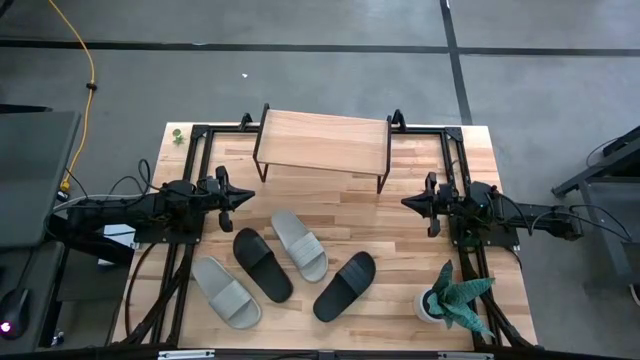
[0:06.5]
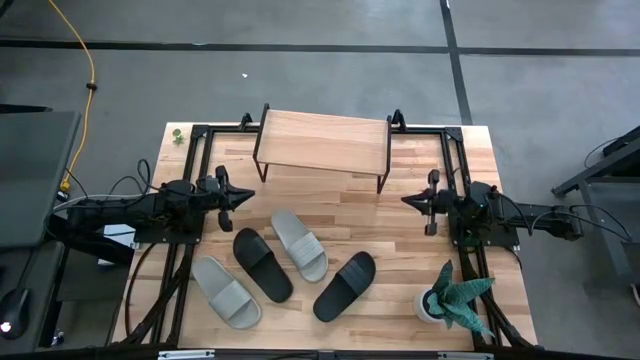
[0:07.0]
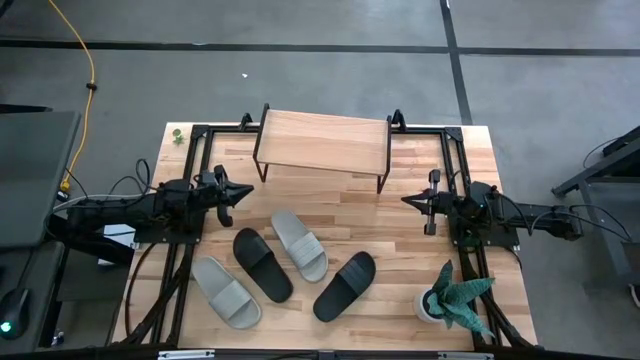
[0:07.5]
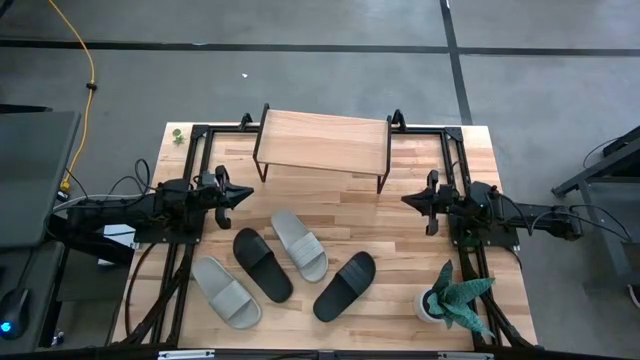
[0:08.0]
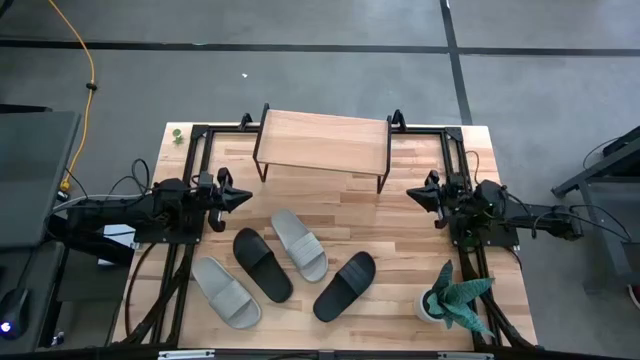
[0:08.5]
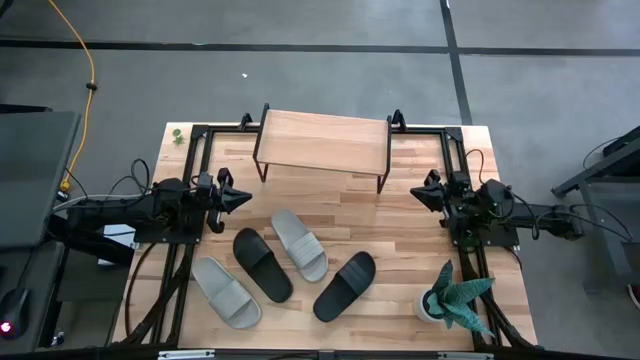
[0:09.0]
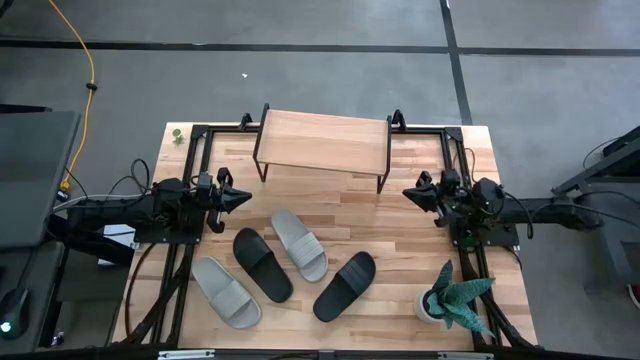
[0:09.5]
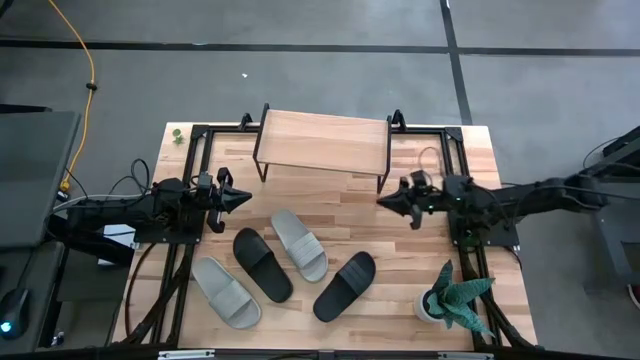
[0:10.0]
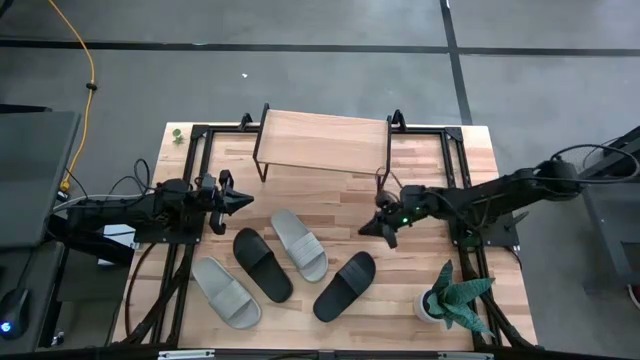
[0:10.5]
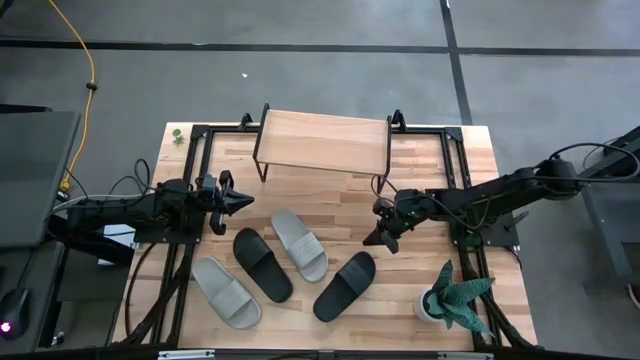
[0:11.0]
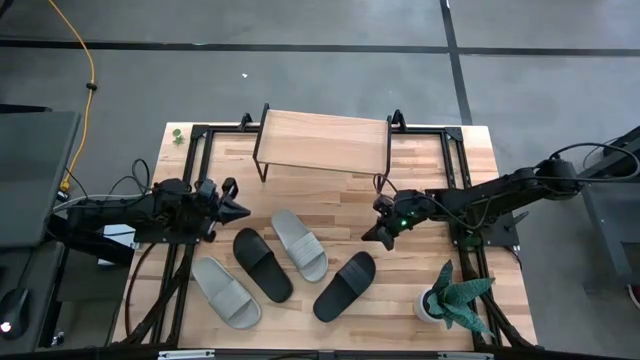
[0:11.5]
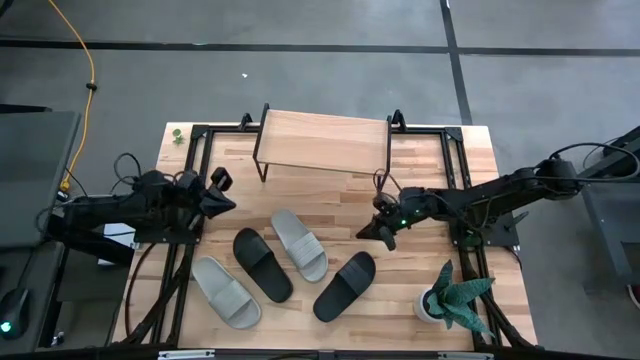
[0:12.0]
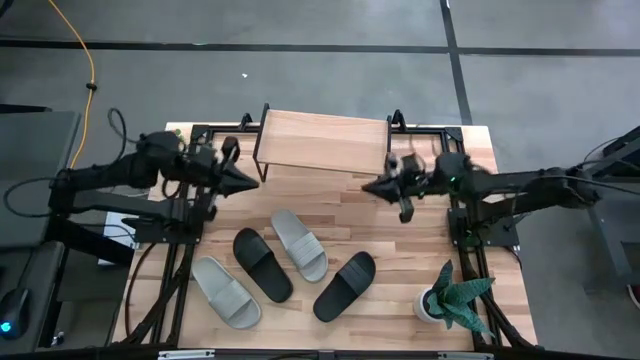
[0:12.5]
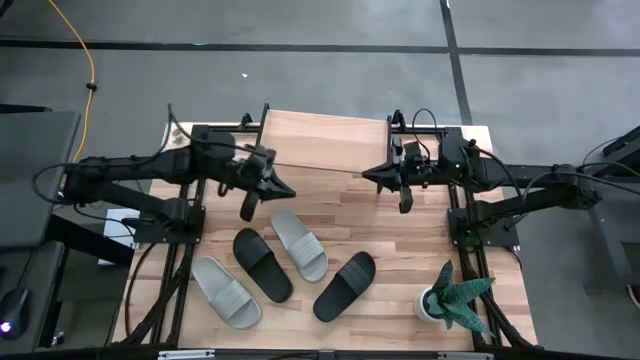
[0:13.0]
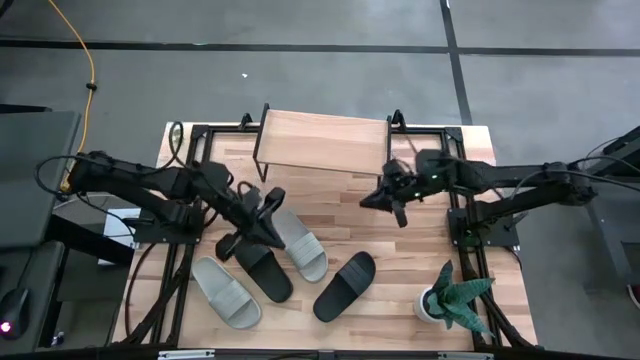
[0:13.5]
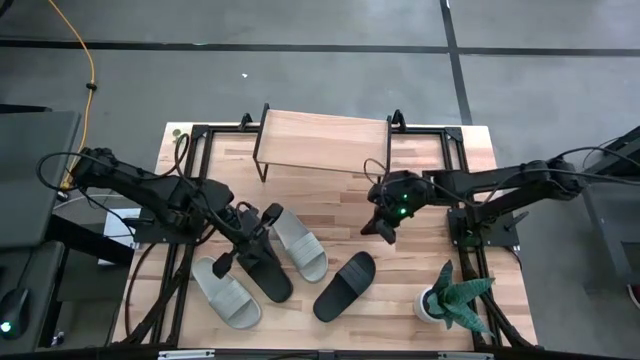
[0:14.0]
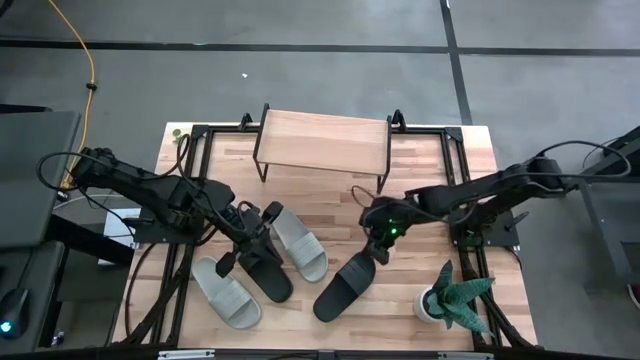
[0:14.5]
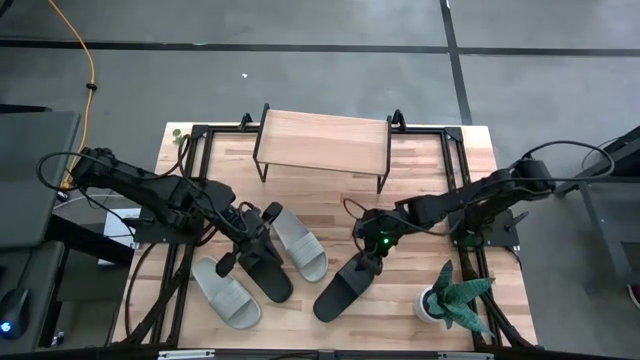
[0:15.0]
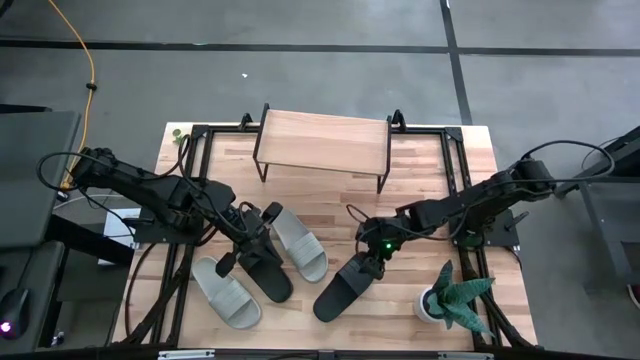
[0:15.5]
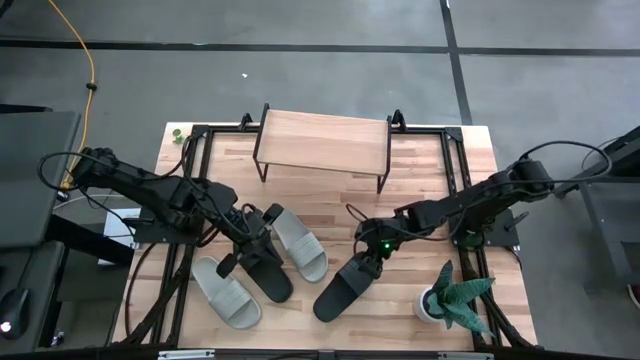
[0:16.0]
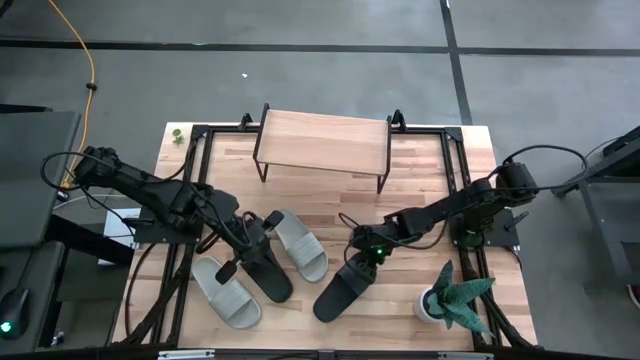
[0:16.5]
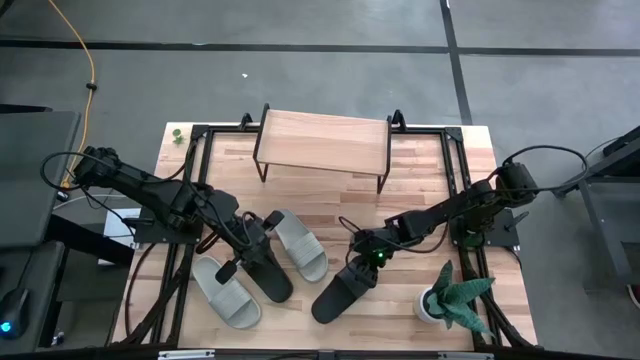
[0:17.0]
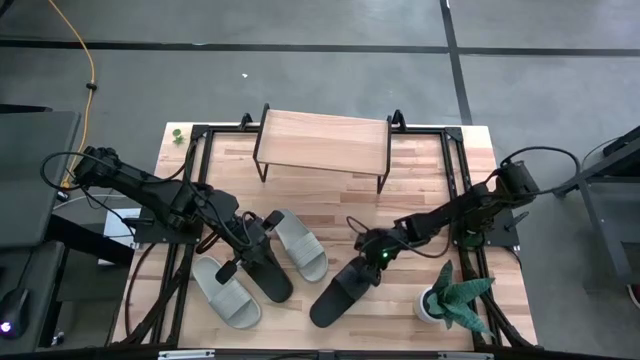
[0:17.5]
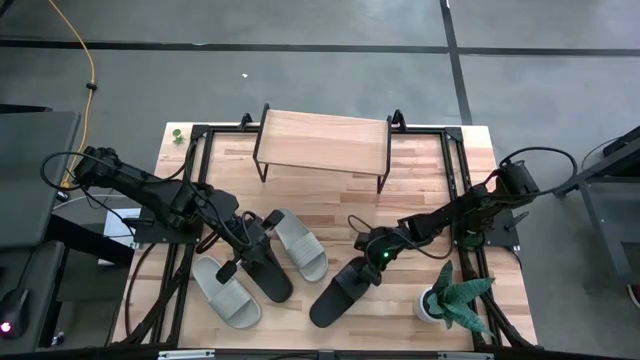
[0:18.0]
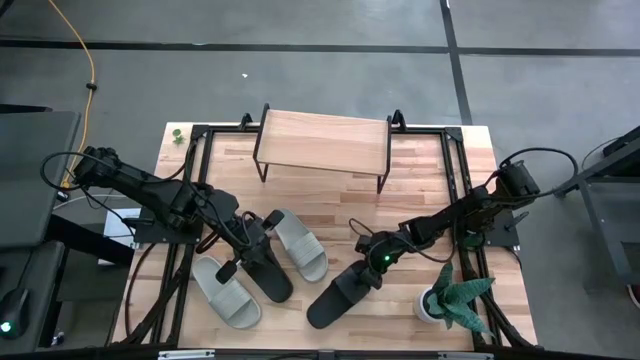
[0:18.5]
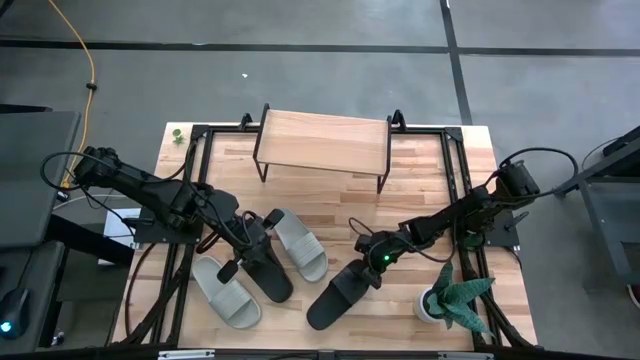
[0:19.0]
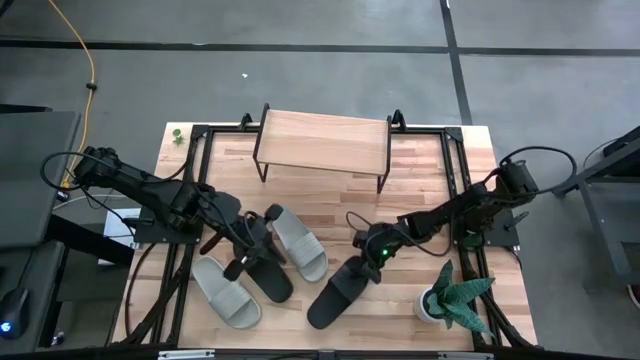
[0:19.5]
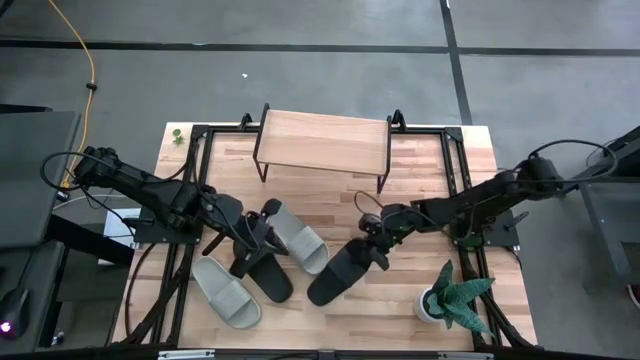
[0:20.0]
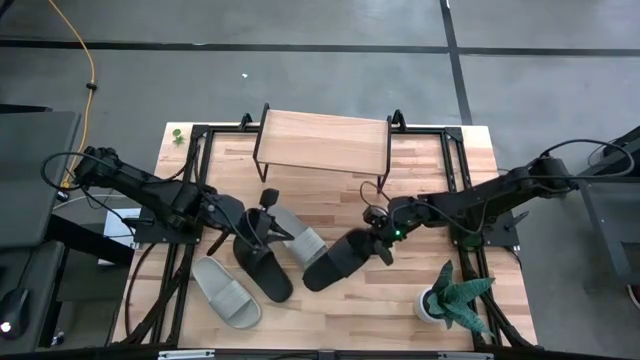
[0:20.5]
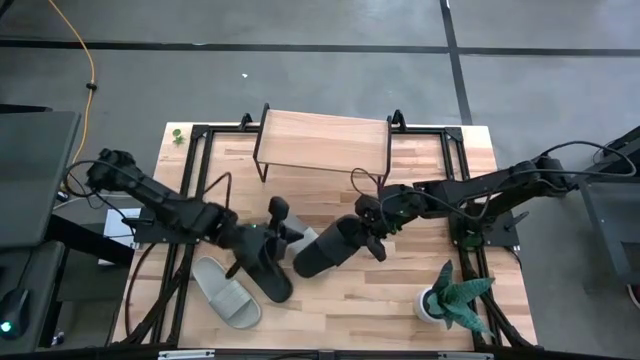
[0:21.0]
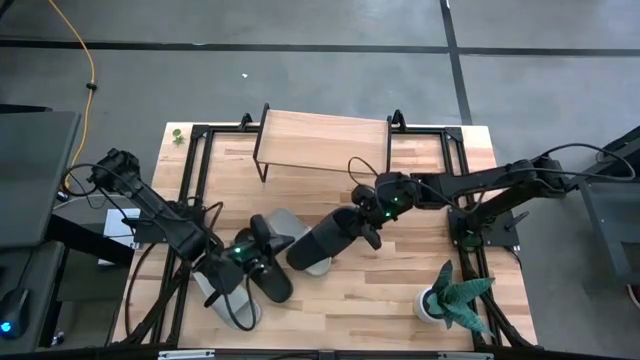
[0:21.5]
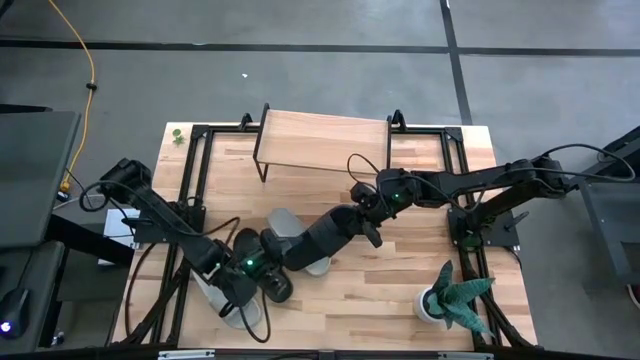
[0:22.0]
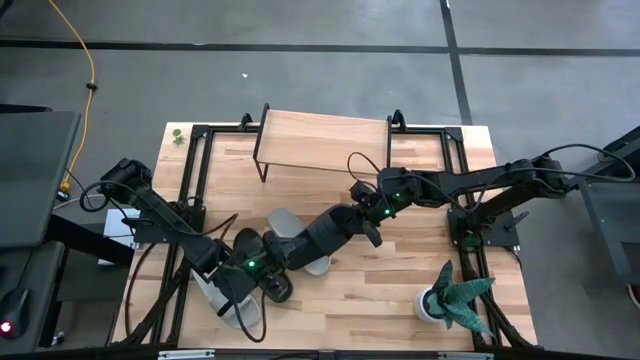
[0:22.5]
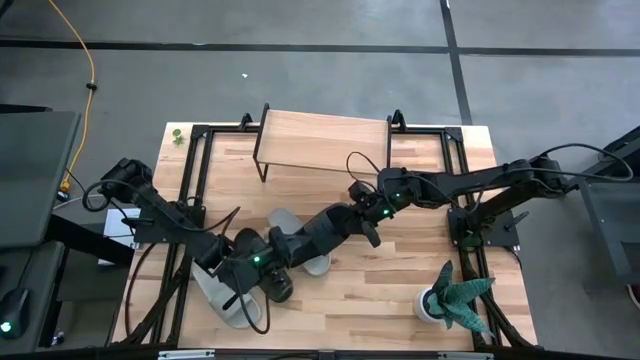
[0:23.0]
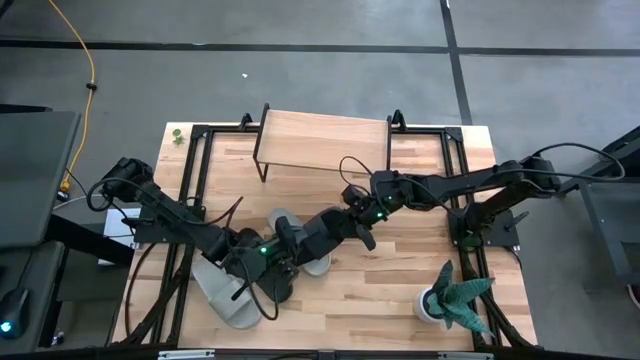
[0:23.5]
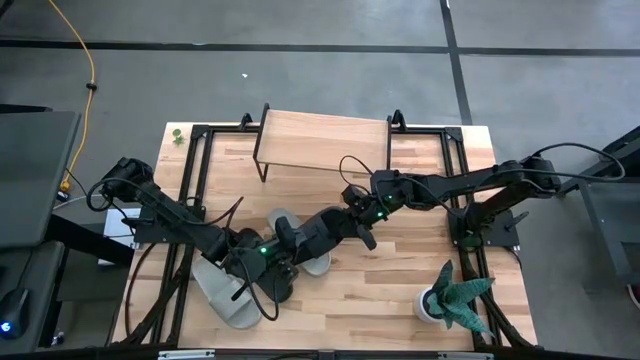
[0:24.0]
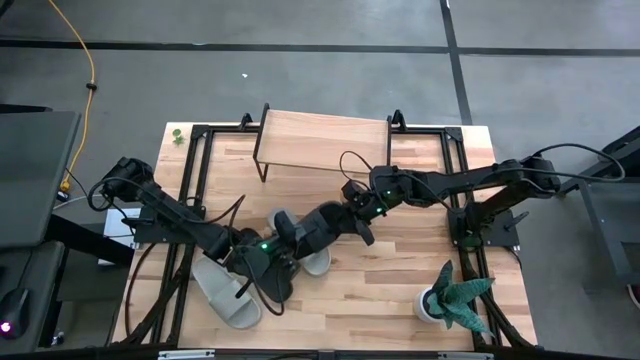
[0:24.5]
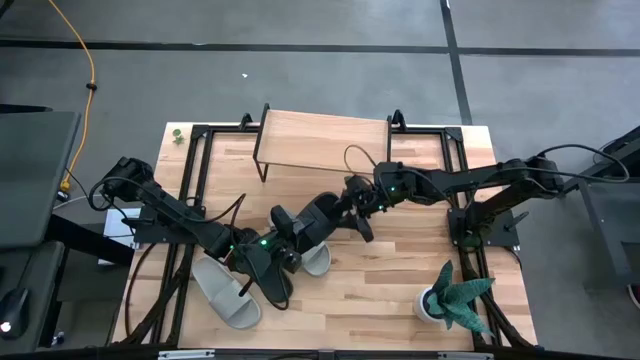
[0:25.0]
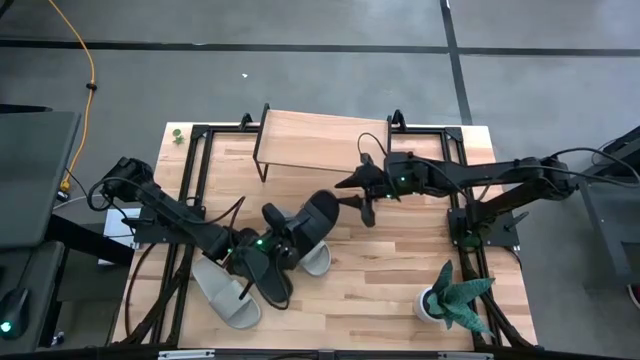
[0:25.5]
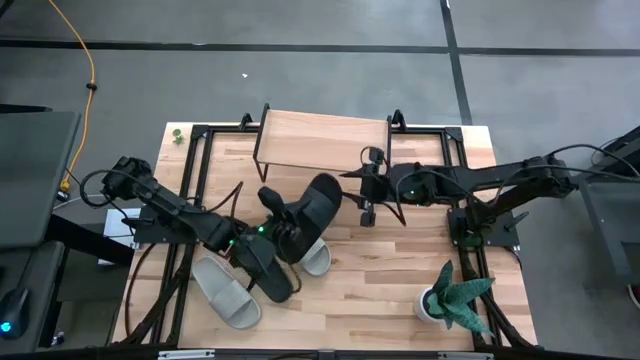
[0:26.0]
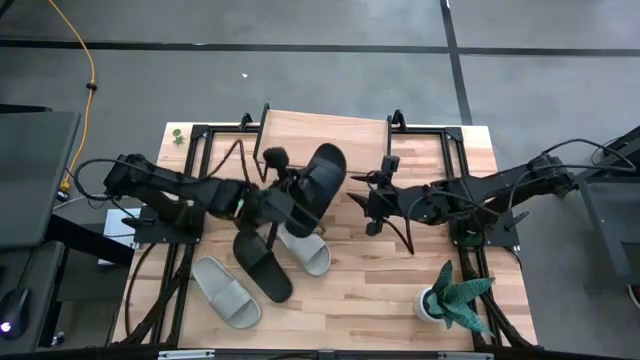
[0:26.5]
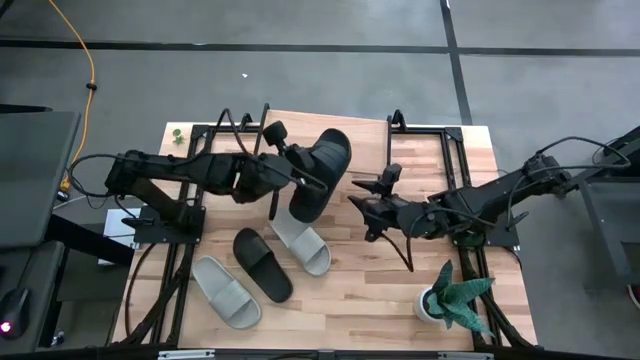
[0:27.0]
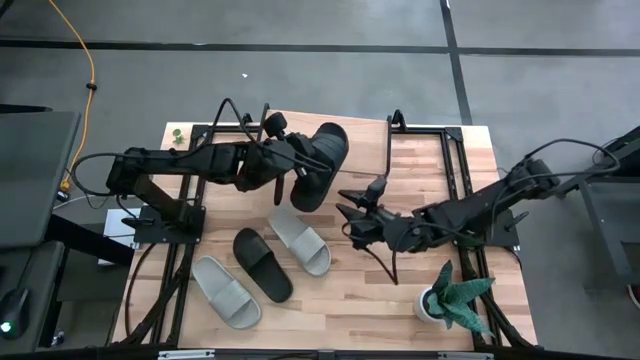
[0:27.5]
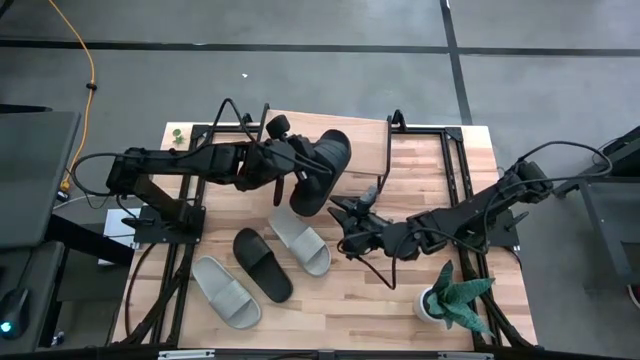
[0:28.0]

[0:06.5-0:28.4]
Task: Pick and place slides into the shelf
Put the right black slipper on the shelf
